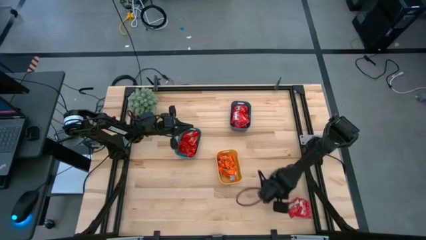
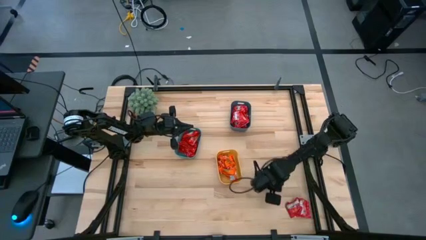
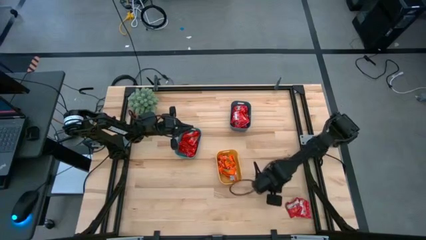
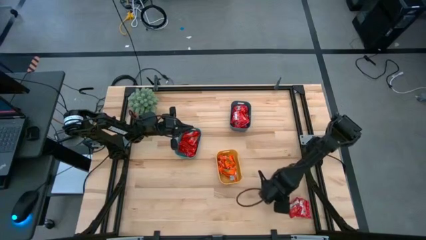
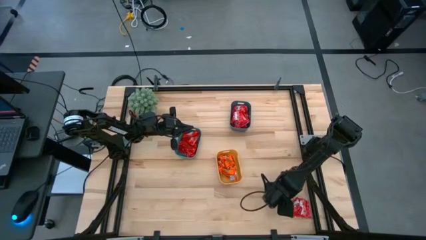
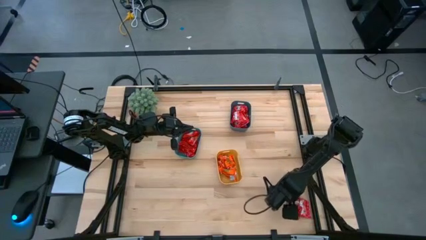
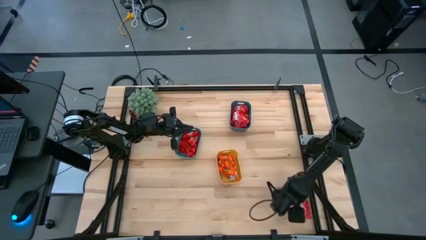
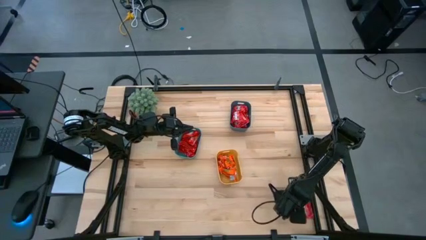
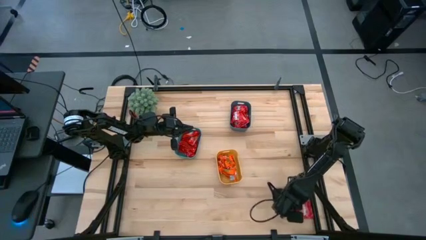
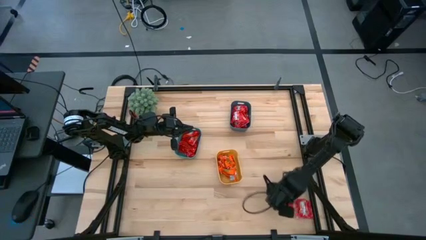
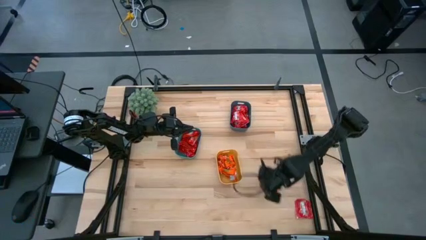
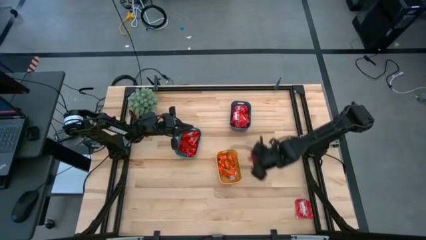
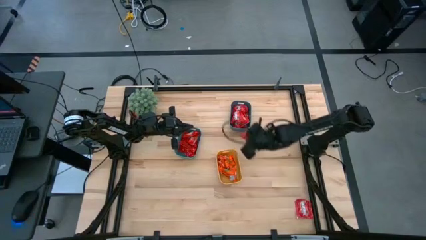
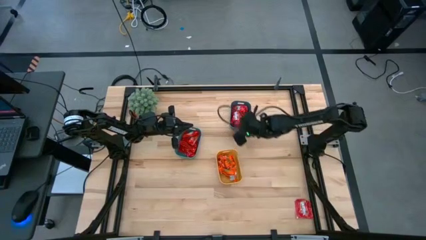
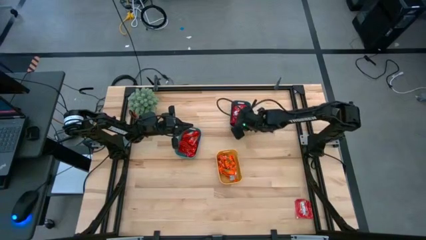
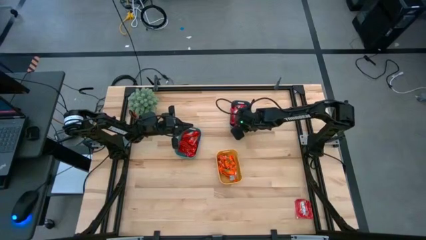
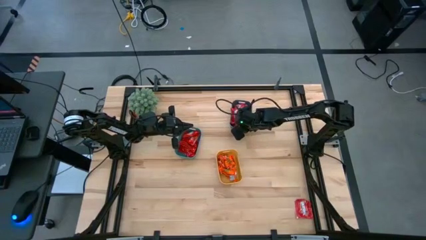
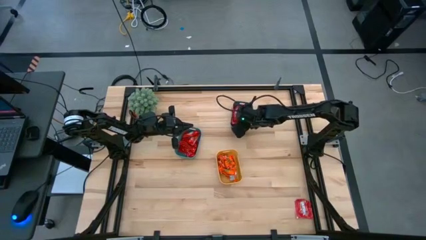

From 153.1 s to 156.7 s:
Task: Sort candy
Put the red candy into the blue bin

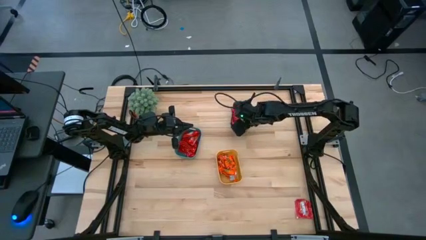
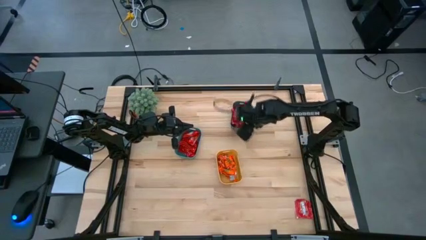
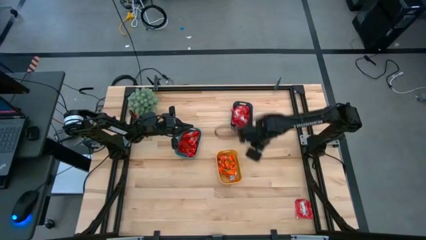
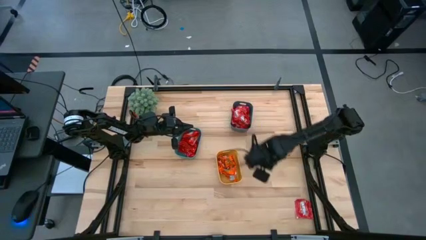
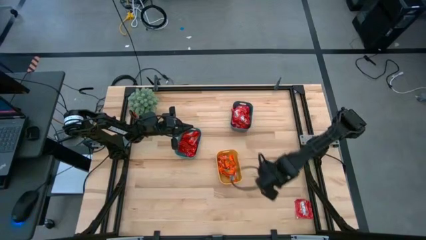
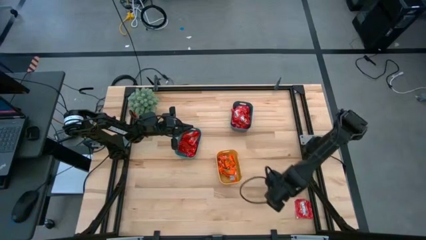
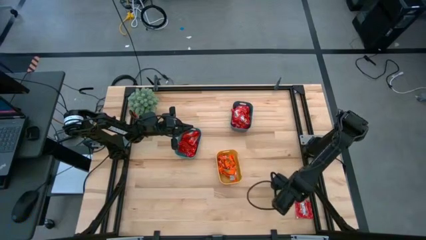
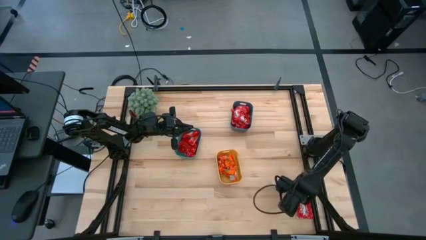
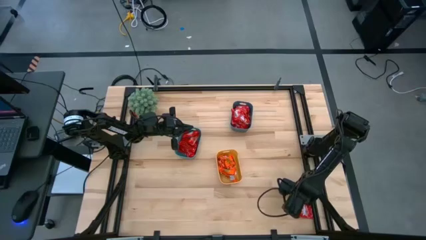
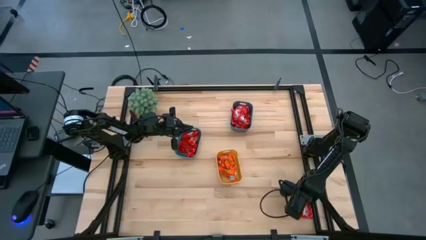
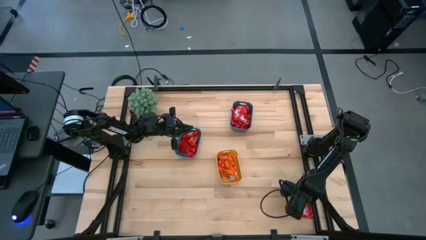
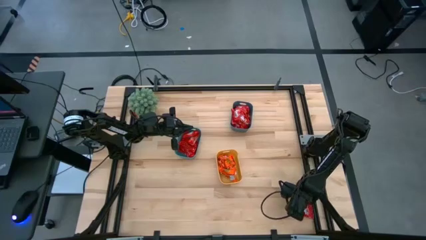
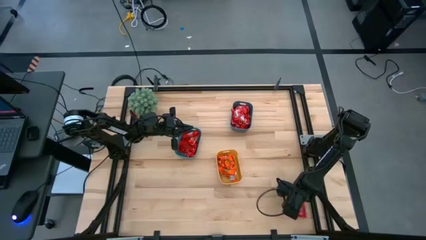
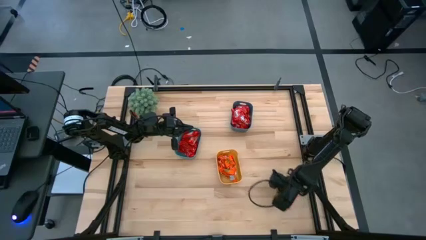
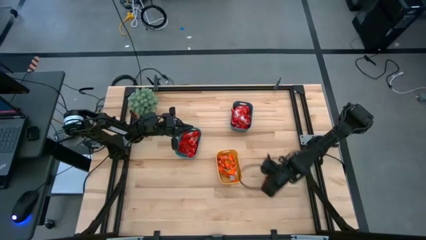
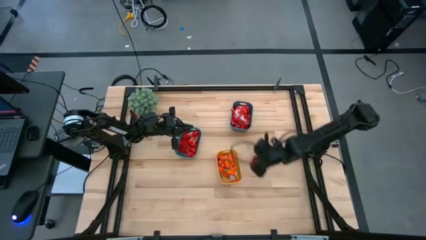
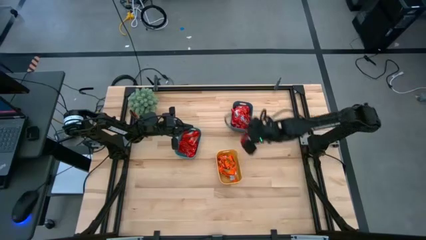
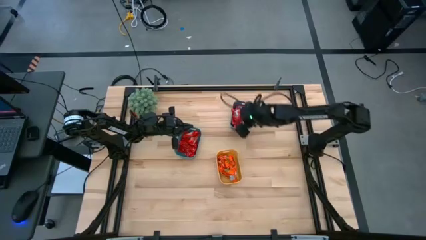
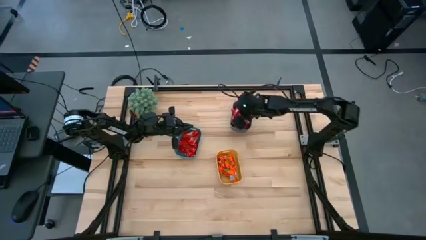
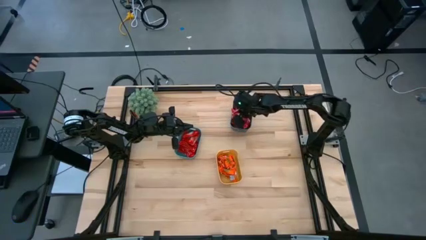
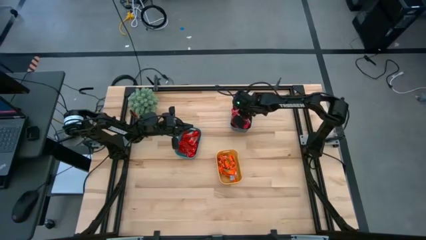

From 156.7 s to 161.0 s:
Put the red candy into the blue bin

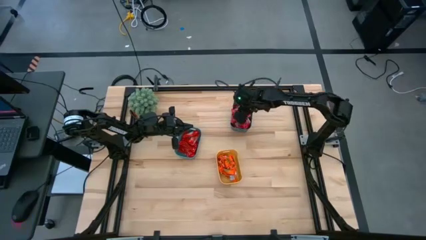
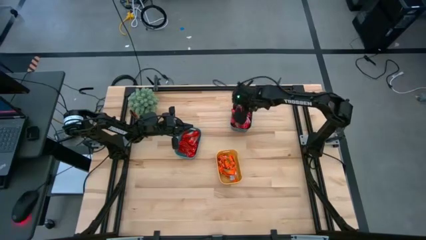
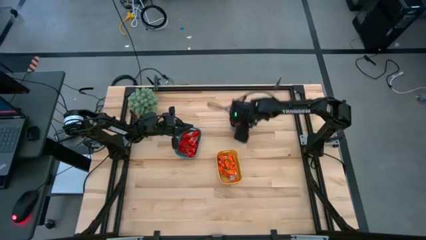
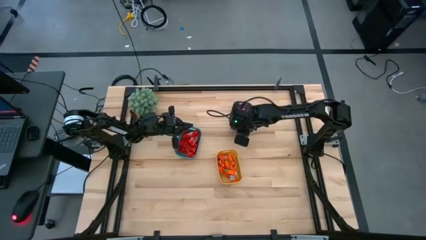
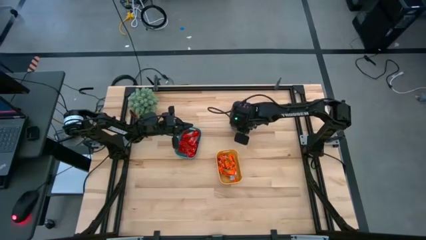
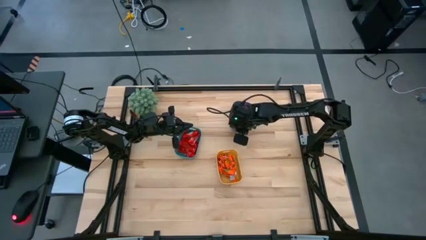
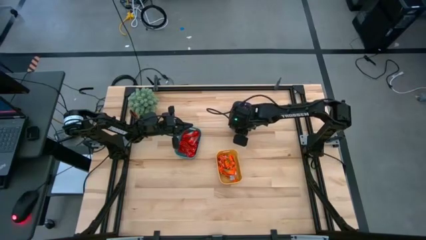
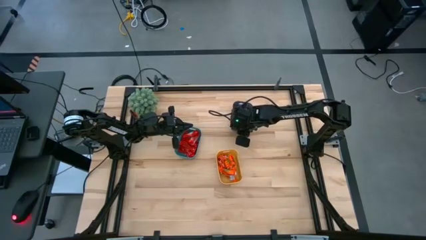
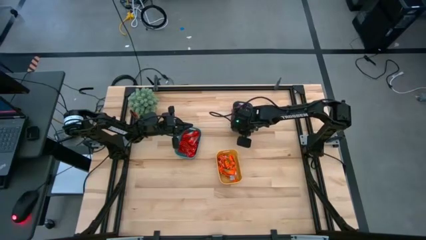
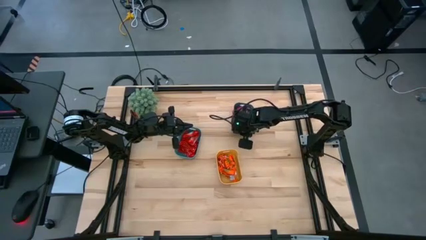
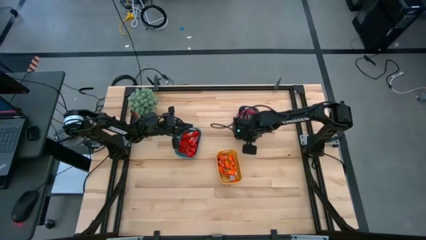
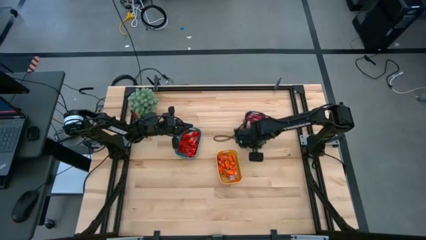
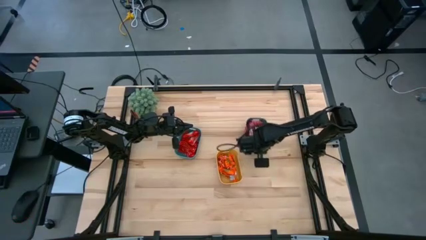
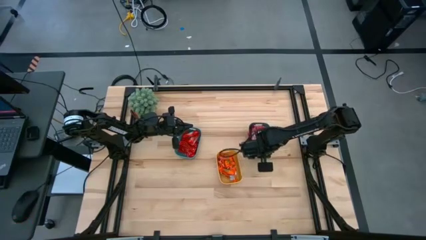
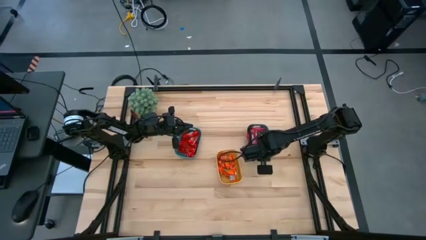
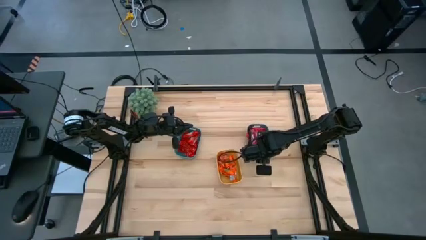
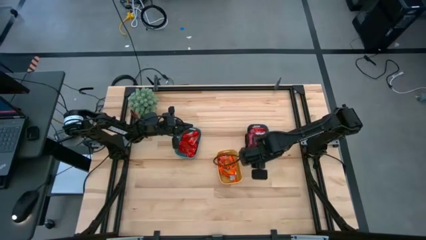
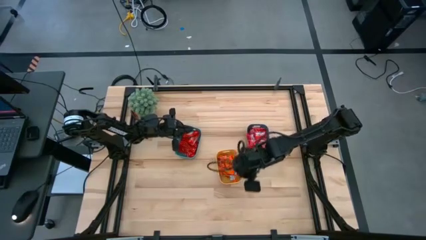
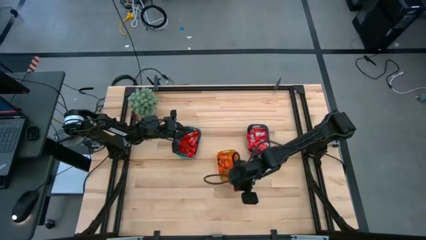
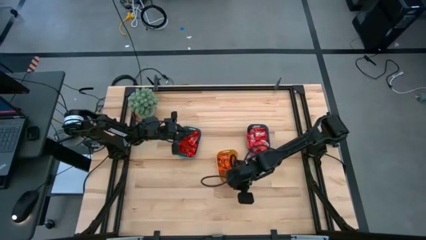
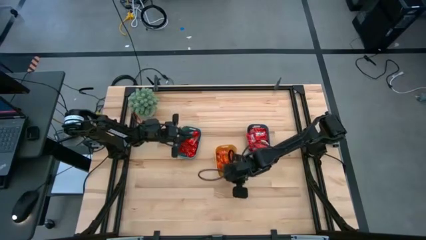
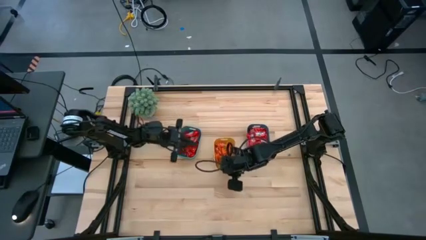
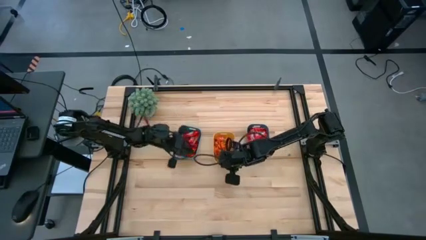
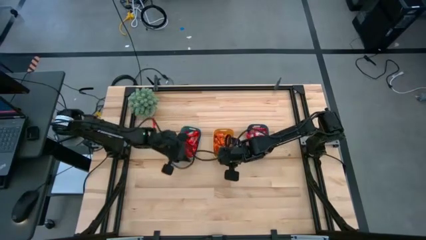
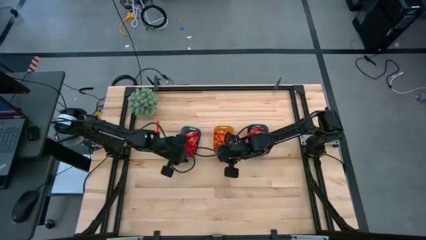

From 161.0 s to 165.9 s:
Move the blue bin from the top right to the middle right

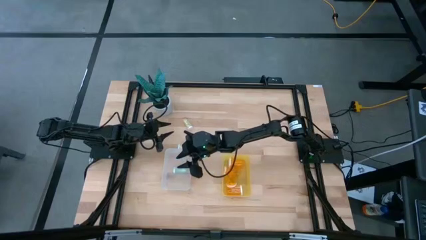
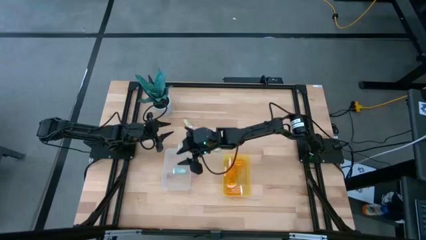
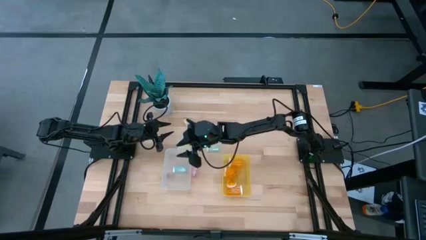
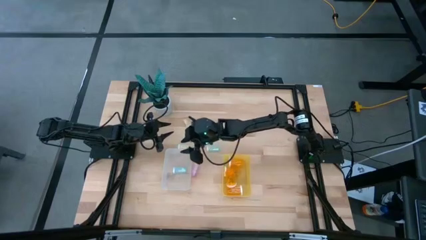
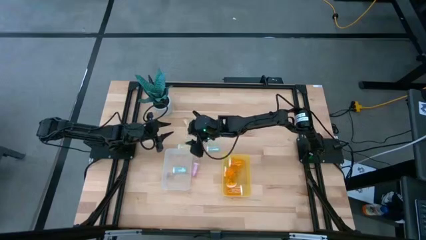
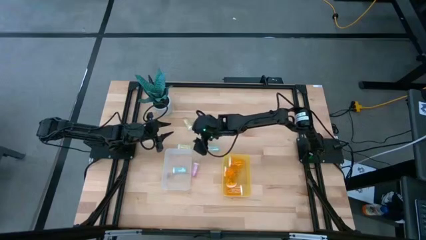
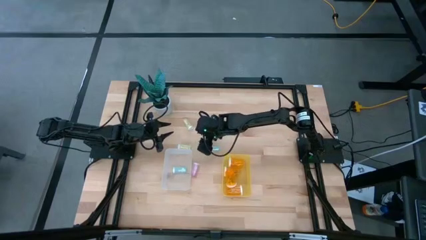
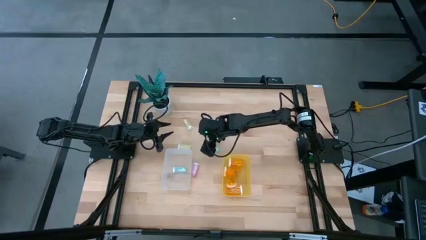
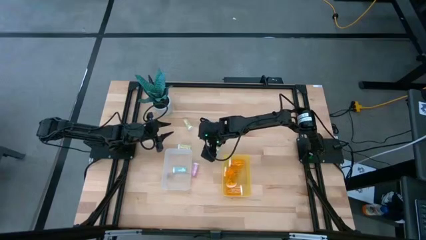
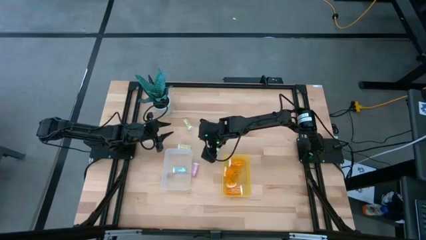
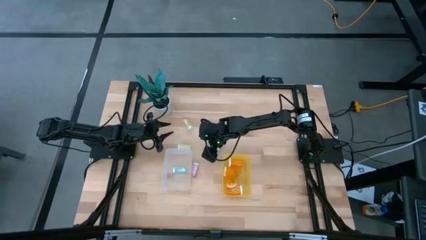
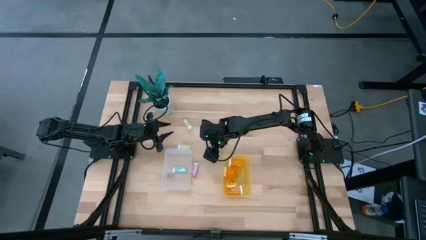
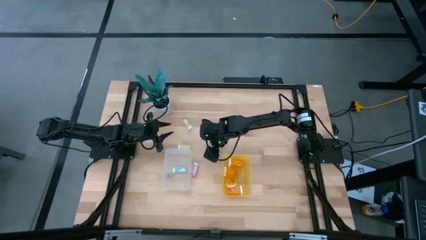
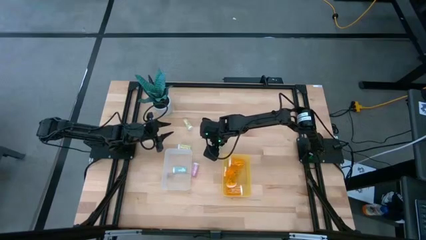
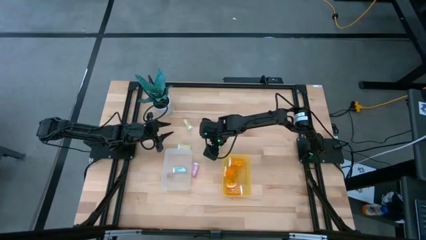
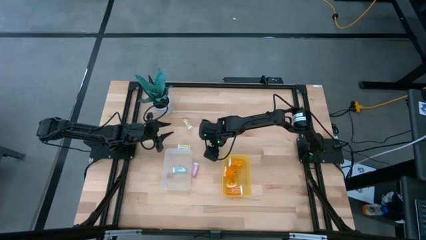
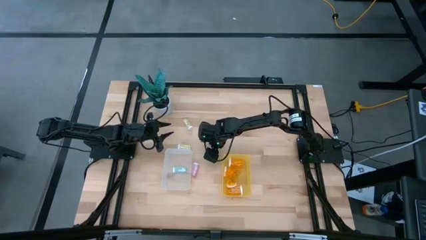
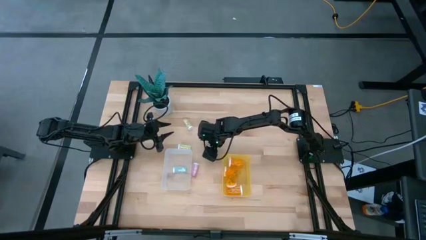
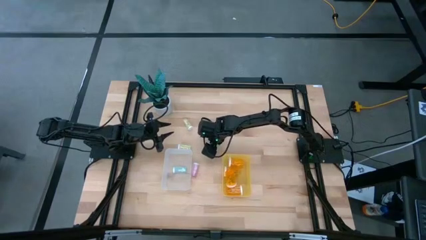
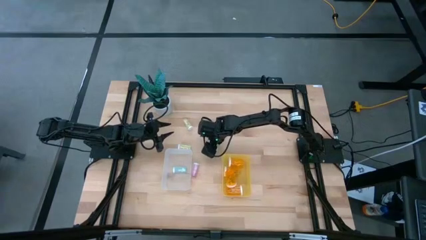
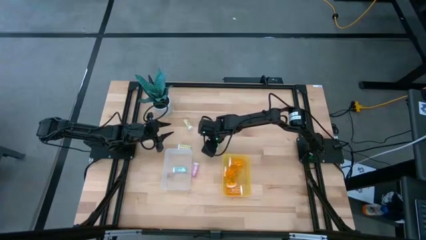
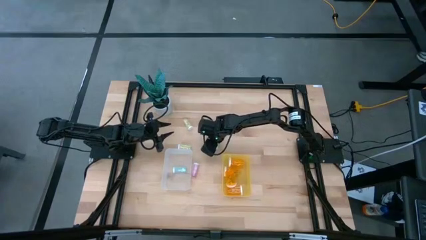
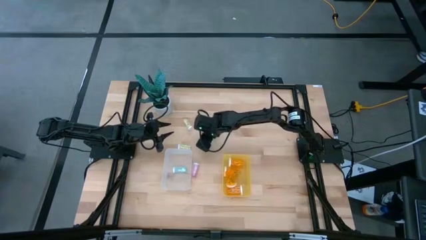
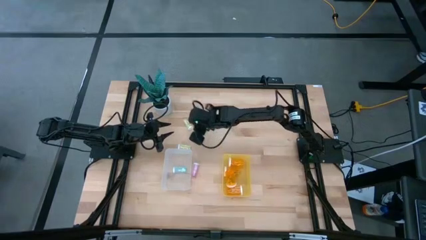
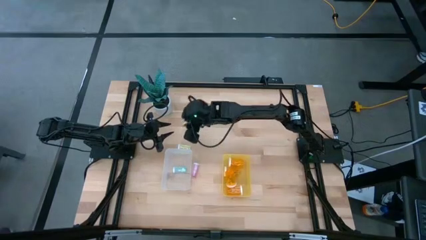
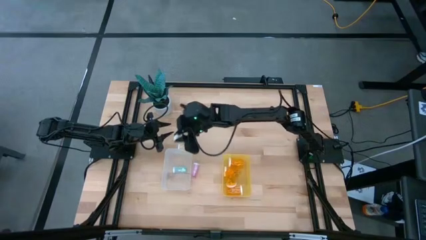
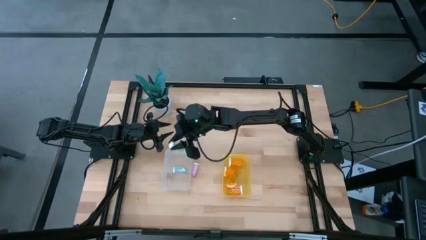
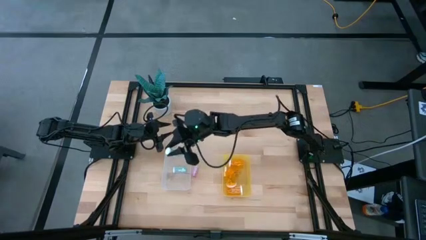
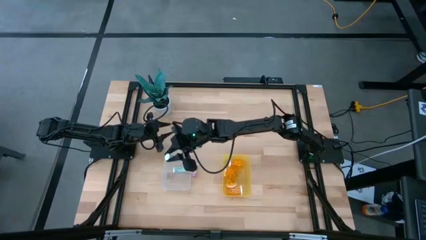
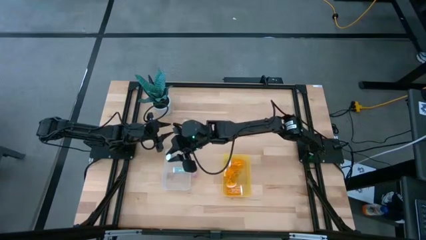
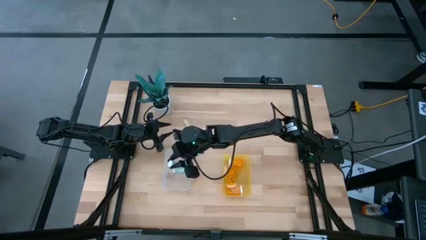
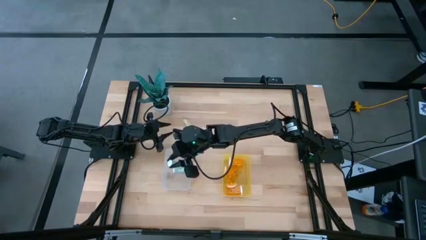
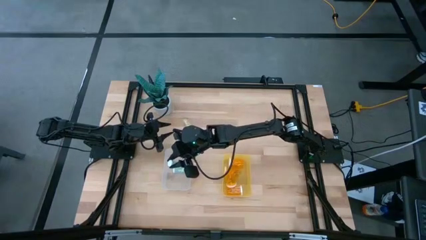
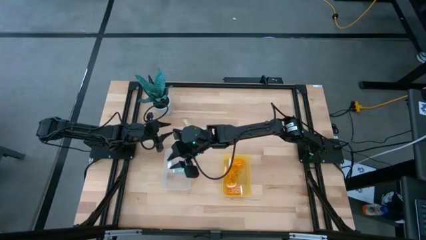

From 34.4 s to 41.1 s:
Task: Pick and place medicine bottles into bin by pill shape (circle, oval)
Put the blue pill bottle into the transparent bin
